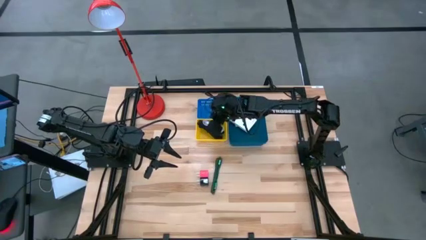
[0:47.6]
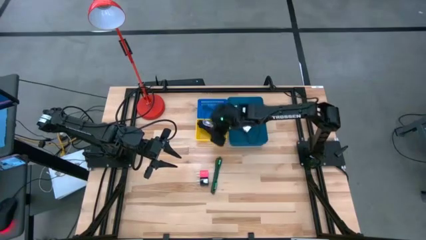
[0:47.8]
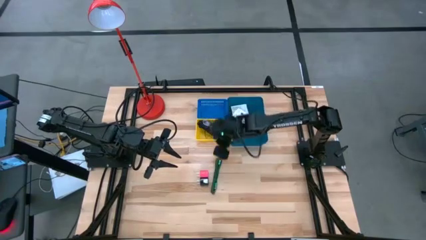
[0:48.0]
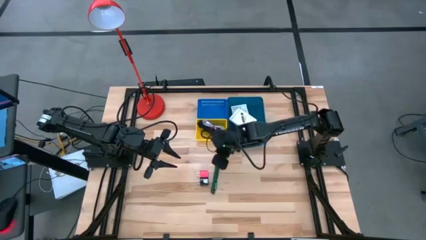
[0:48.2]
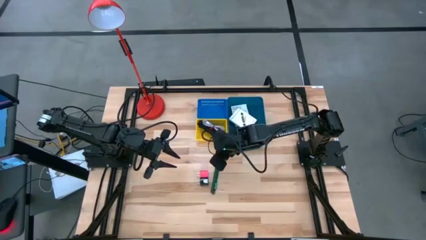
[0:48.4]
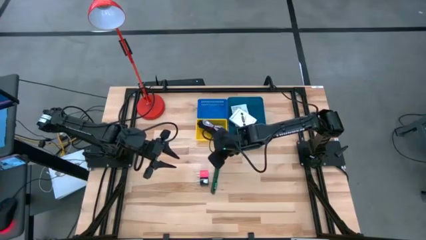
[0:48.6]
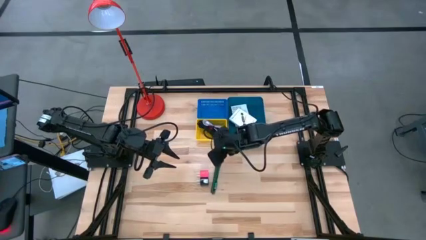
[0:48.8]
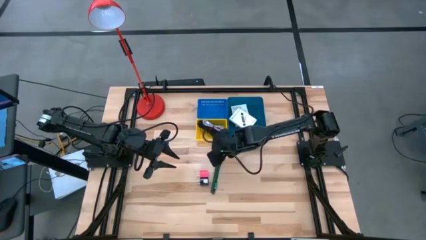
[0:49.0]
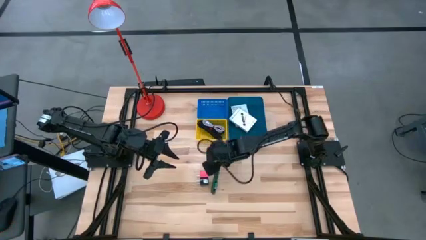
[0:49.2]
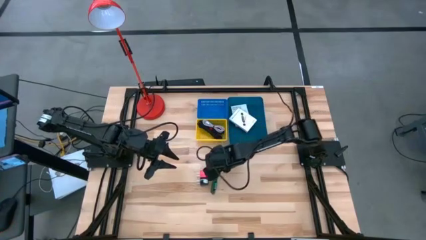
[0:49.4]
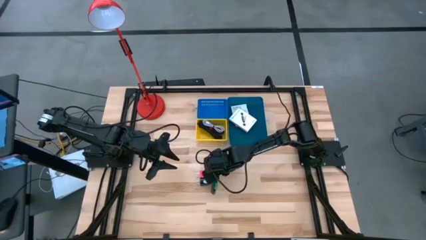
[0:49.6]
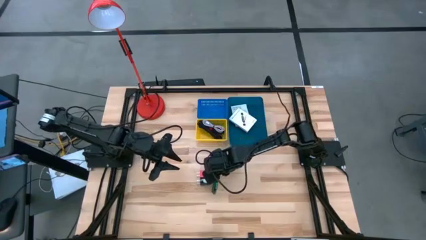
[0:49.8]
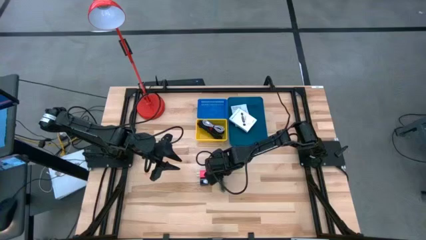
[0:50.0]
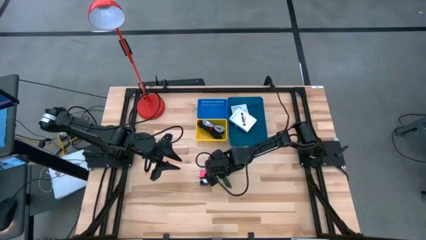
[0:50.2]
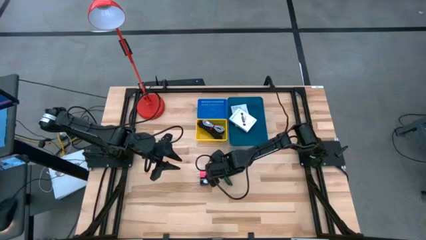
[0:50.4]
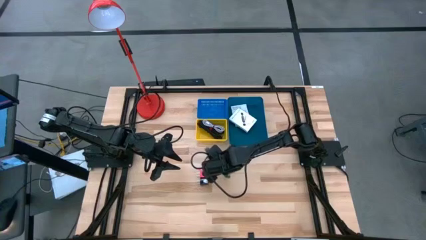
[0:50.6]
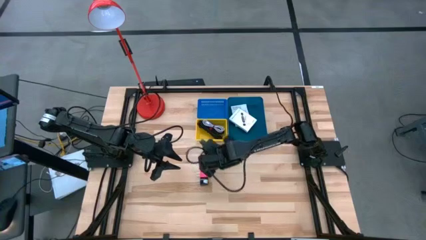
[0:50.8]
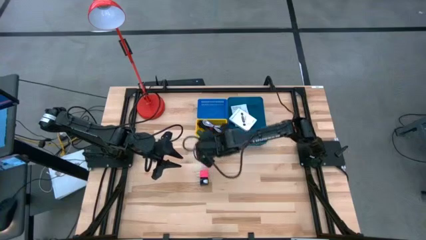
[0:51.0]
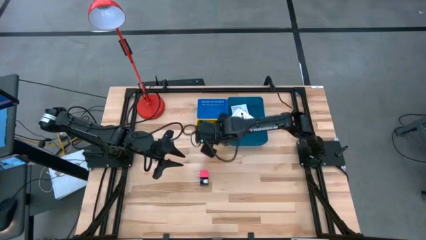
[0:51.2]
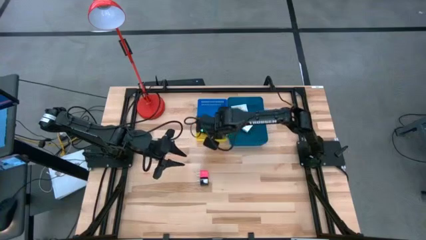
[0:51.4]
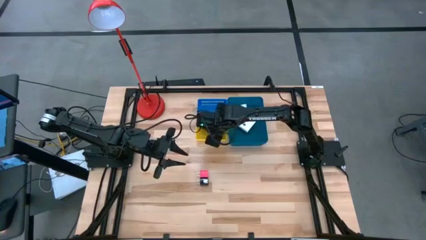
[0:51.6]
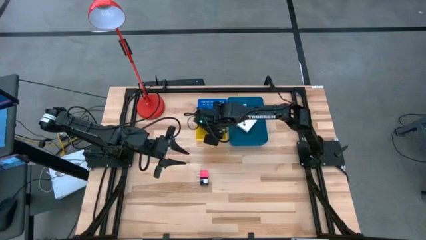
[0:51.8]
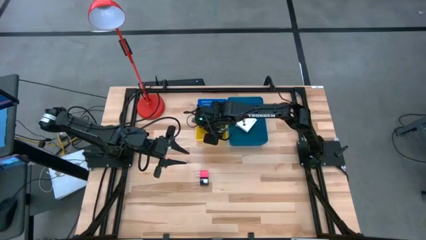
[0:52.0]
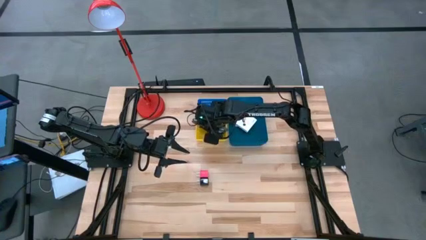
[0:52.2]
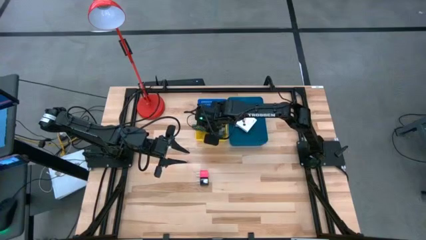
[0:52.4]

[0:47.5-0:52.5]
Task: Pick and place items into bin
Put the green charger cable into the yellow bin

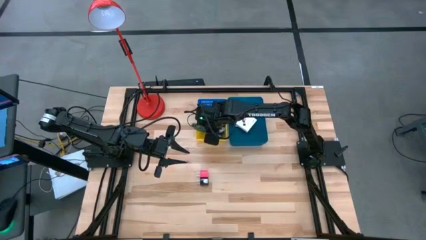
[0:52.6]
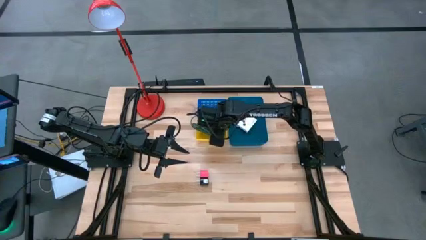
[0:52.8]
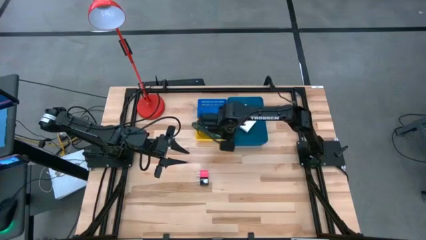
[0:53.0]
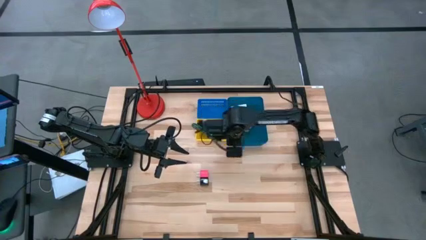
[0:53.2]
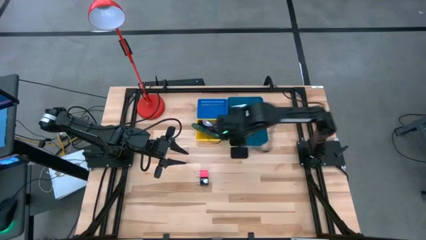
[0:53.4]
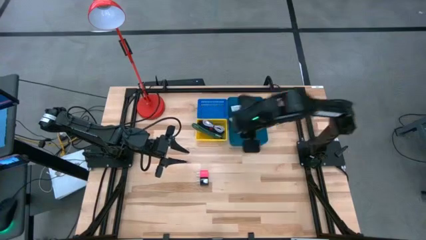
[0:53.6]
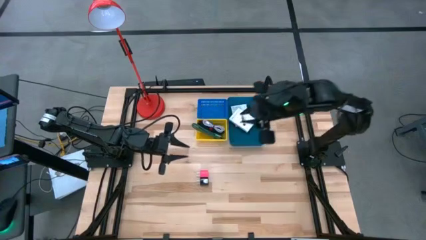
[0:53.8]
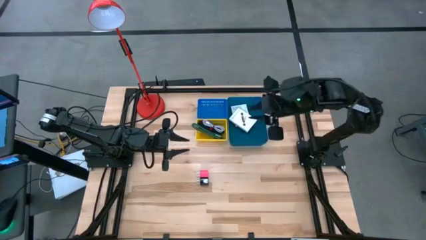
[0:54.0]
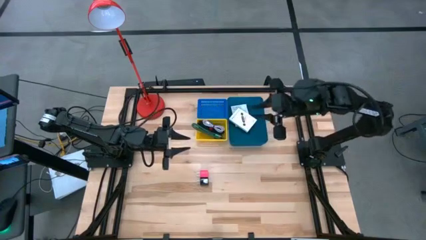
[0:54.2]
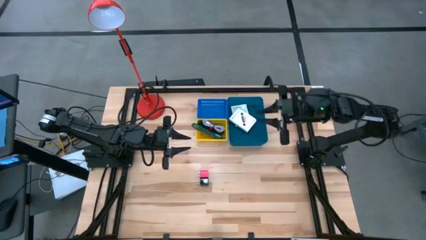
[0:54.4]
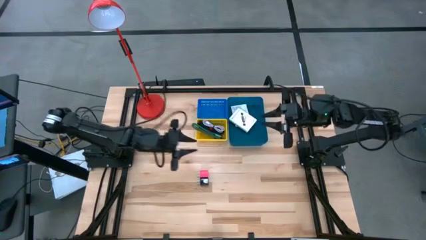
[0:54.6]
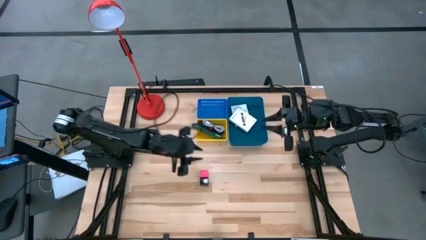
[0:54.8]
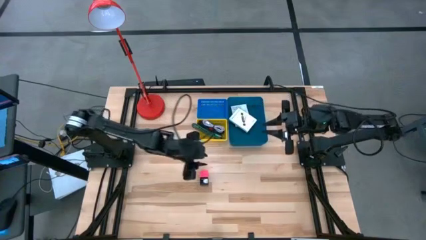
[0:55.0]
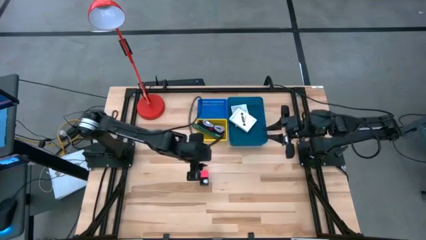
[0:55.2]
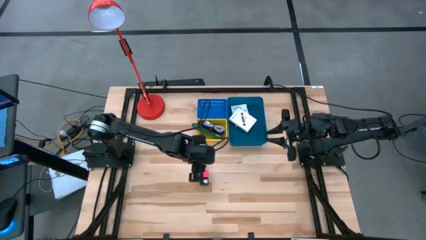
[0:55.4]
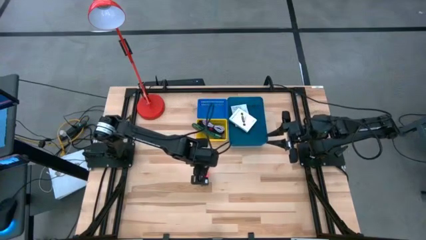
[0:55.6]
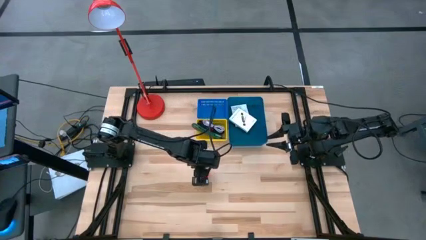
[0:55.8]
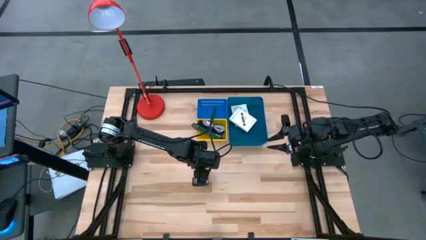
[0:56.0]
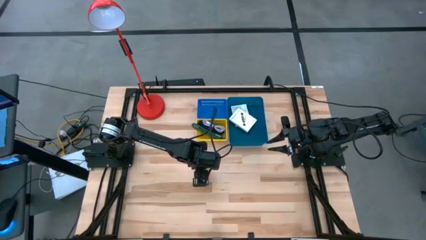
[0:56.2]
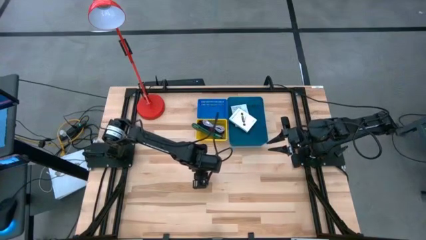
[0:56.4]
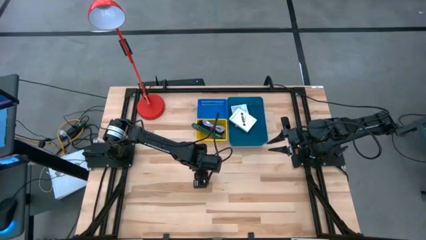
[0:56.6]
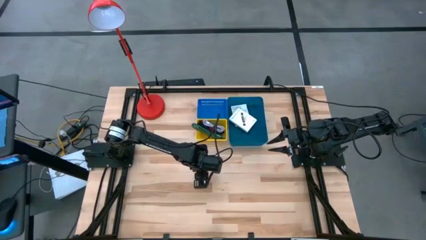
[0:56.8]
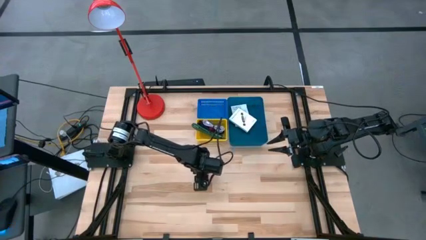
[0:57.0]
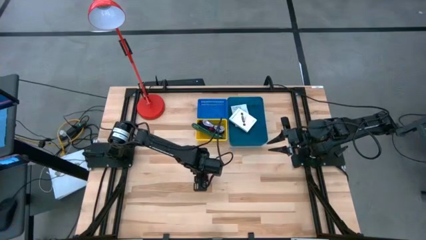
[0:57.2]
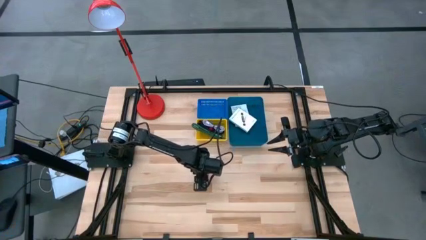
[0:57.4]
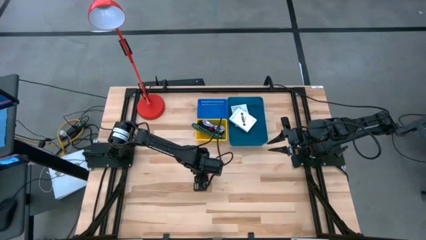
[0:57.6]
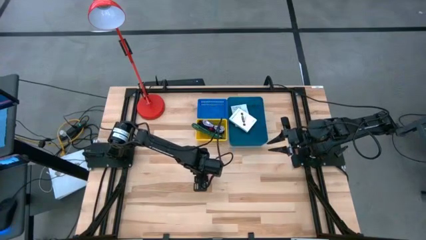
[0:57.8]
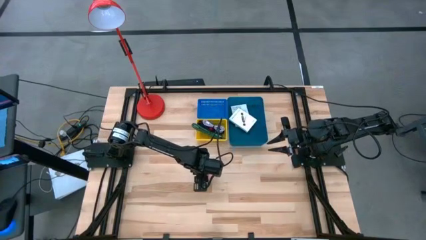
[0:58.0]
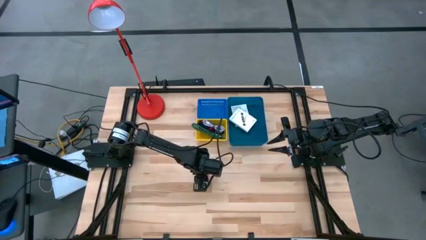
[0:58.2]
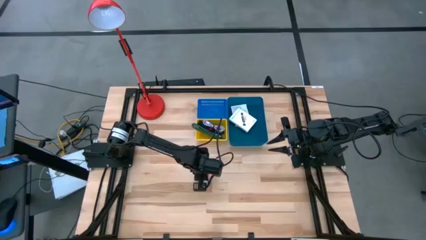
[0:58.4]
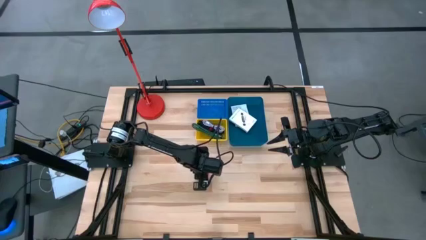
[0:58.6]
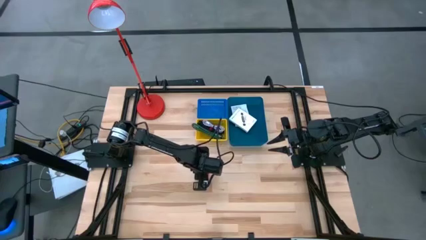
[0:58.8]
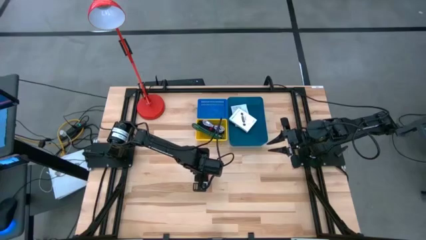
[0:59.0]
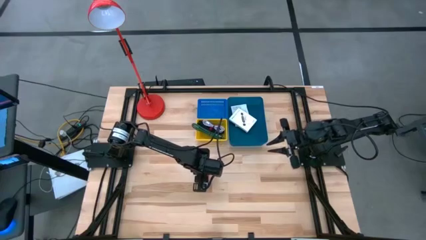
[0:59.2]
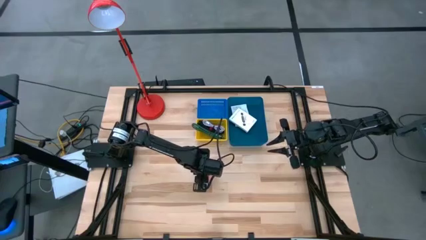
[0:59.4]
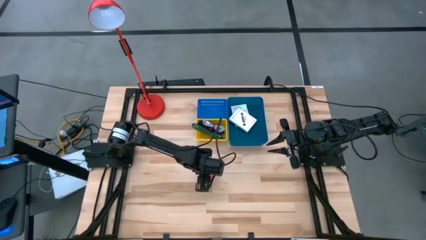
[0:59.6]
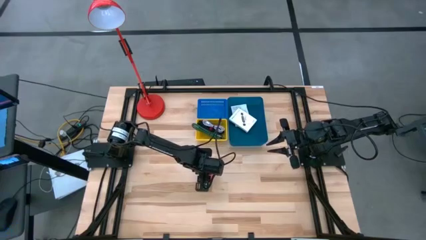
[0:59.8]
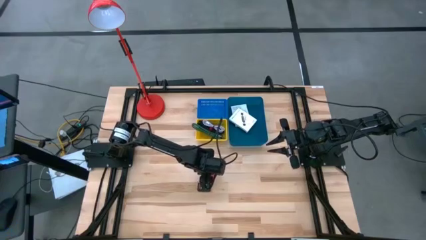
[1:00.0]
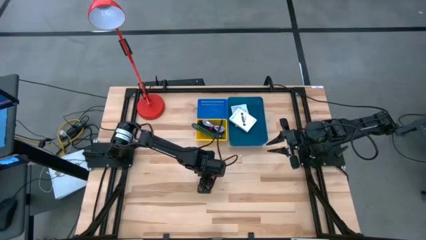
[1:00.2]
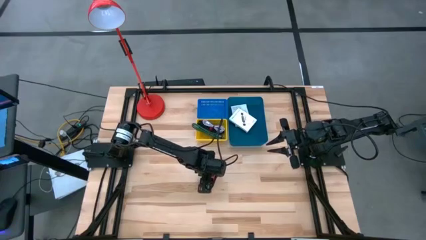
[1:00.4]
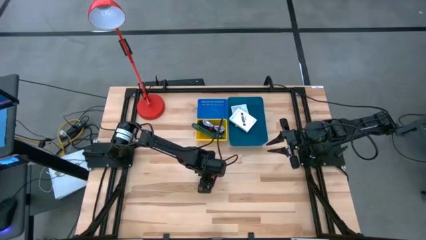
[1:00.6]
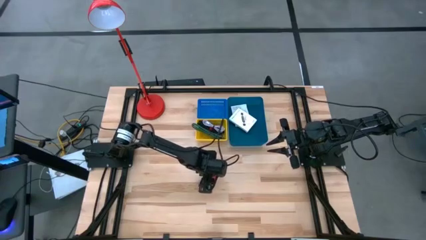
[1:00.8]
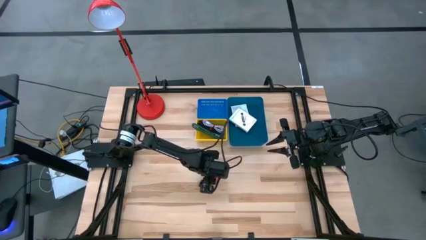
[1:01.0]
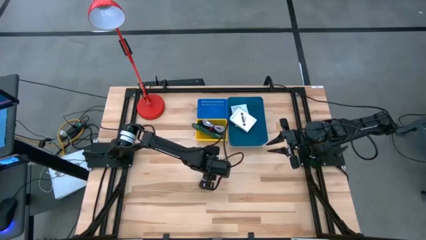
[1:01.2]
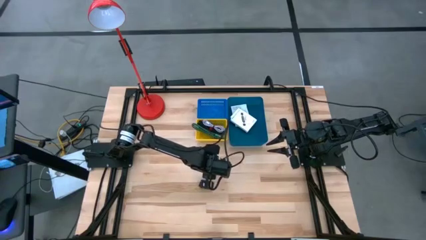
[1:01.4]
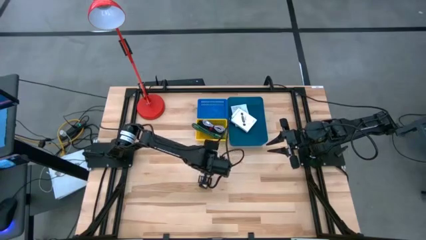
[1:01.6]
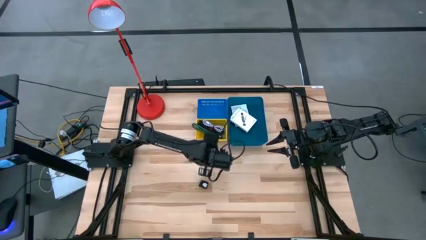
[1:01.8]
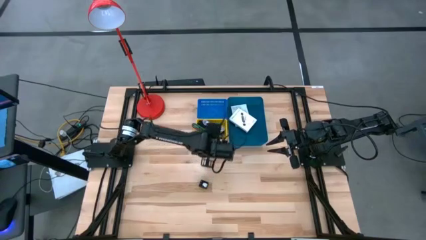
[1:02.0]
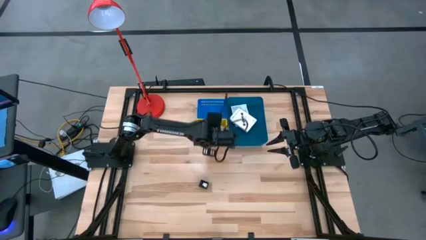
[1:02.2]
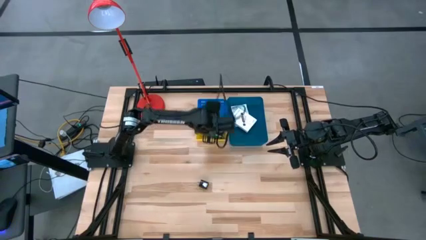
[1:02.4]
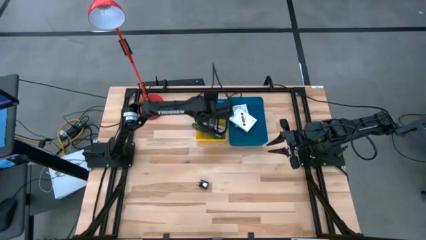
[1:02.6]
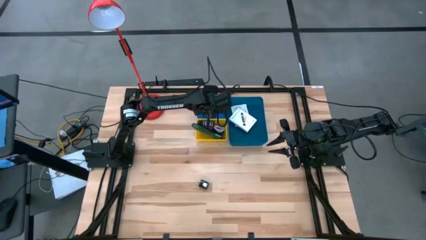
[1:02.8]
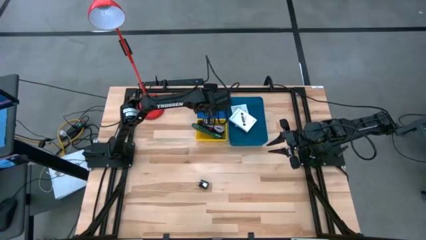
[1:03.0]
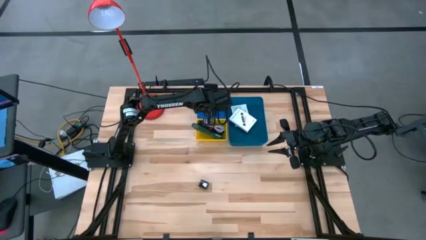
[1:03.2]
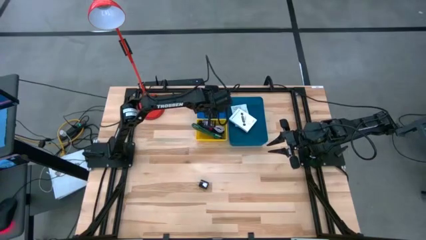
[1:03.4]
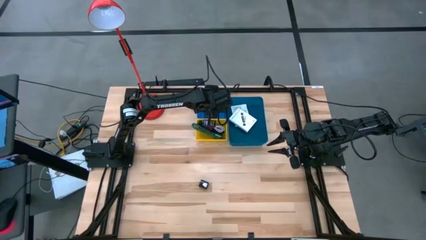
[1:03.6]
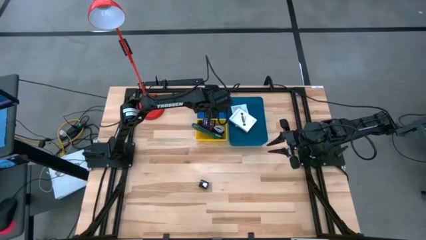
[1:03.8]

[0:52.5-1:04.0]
Put the pink charger adapter into the light blue bin
